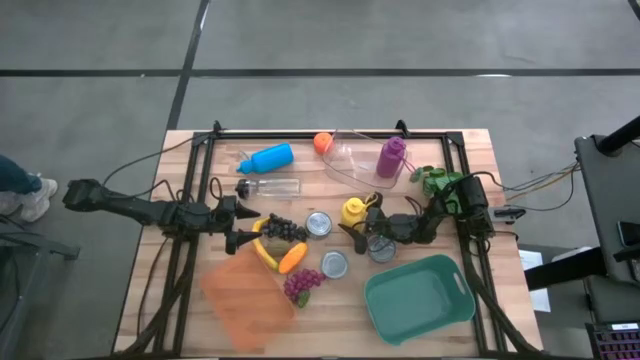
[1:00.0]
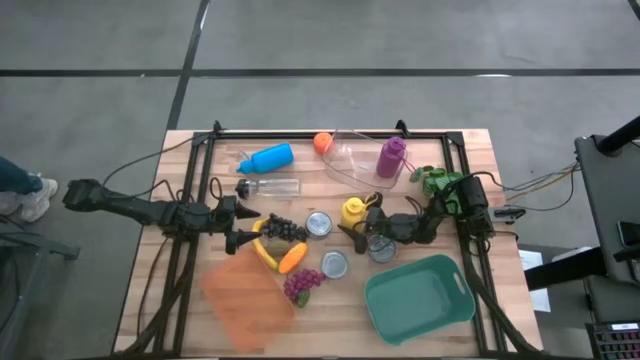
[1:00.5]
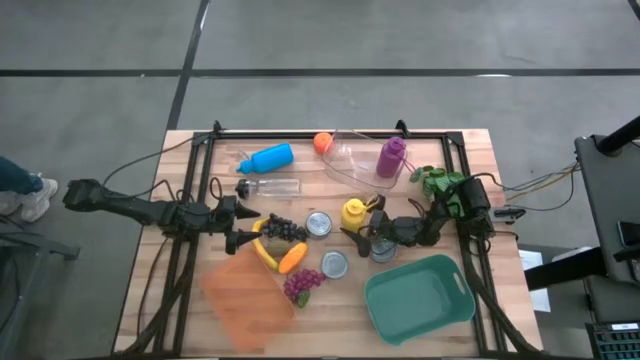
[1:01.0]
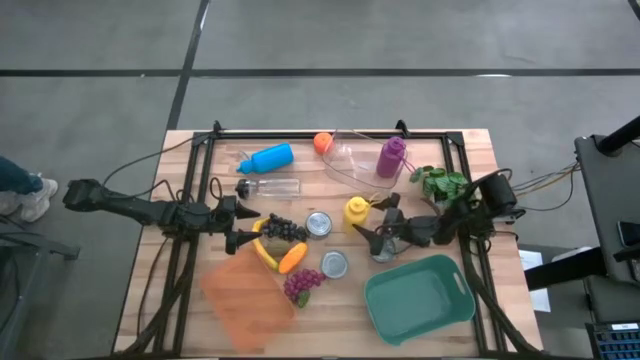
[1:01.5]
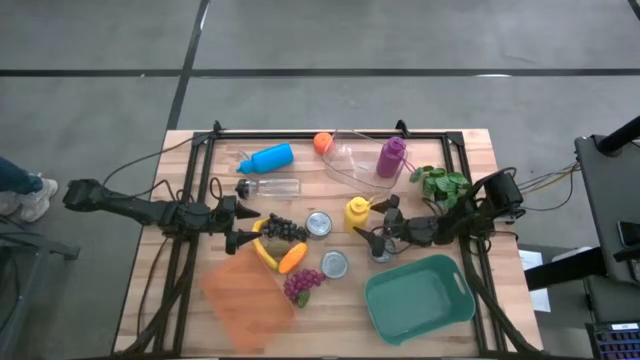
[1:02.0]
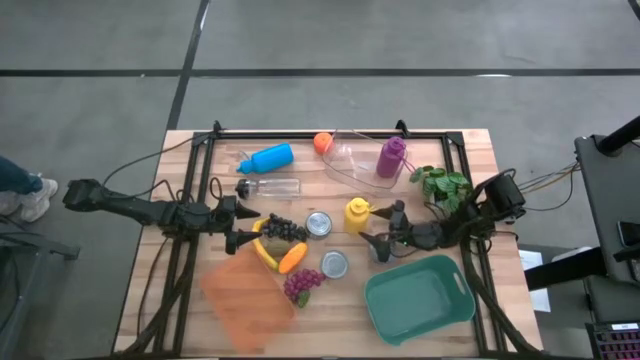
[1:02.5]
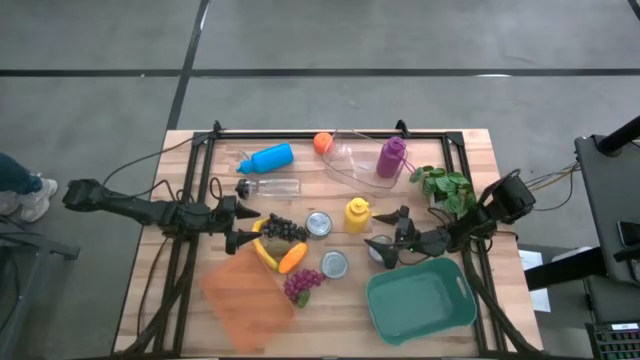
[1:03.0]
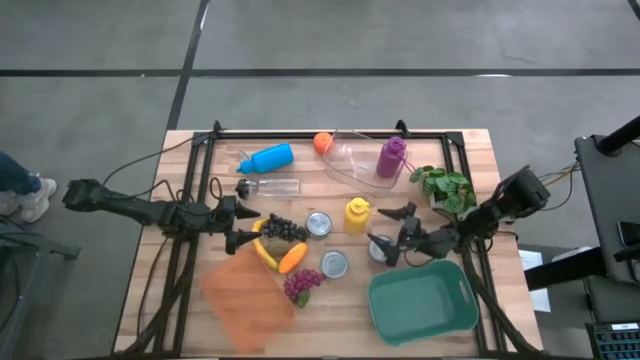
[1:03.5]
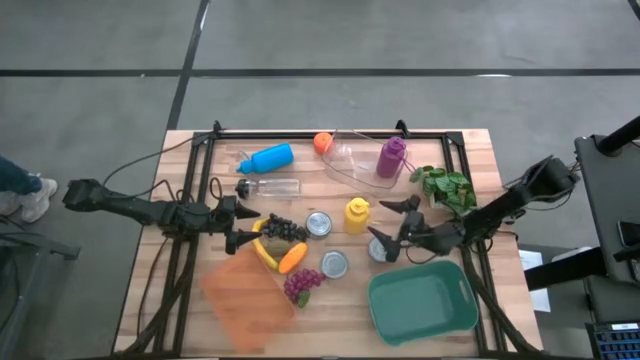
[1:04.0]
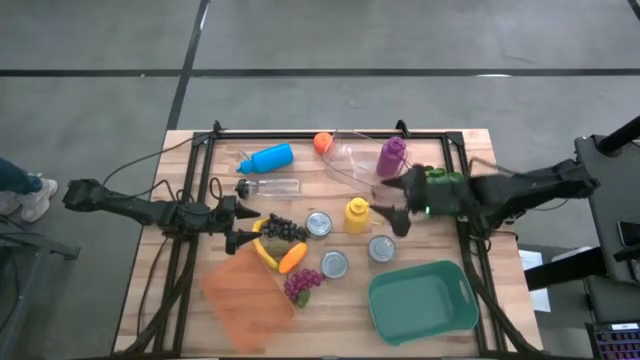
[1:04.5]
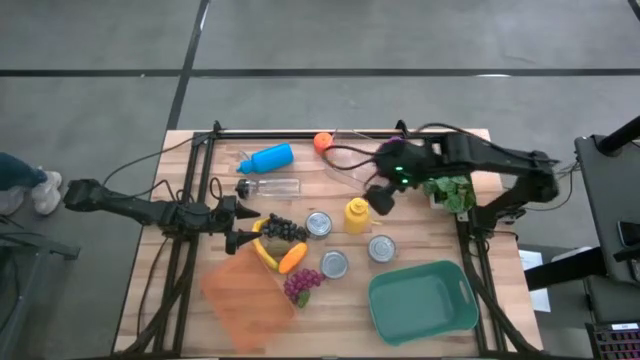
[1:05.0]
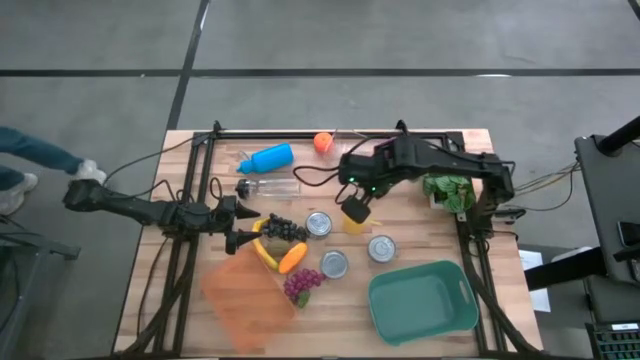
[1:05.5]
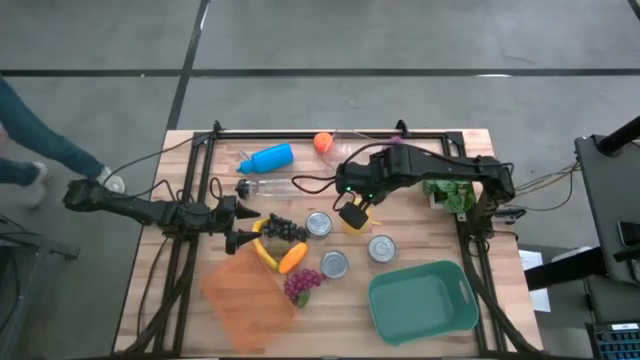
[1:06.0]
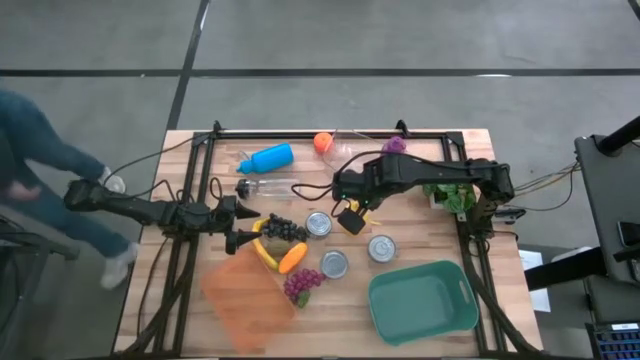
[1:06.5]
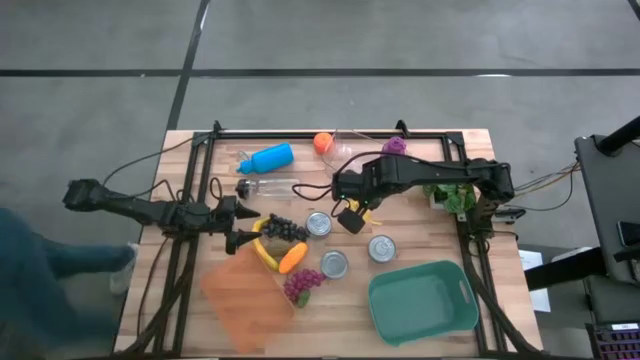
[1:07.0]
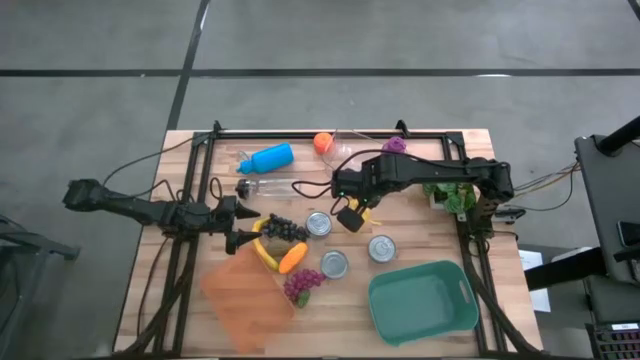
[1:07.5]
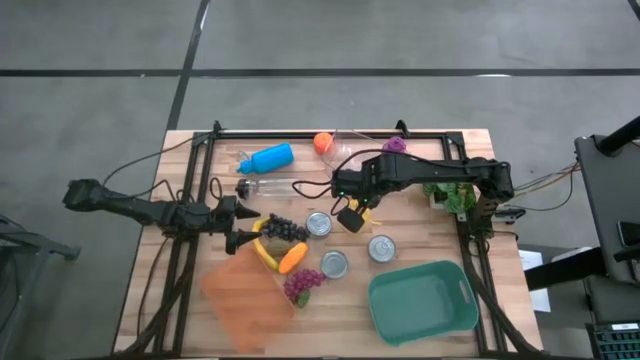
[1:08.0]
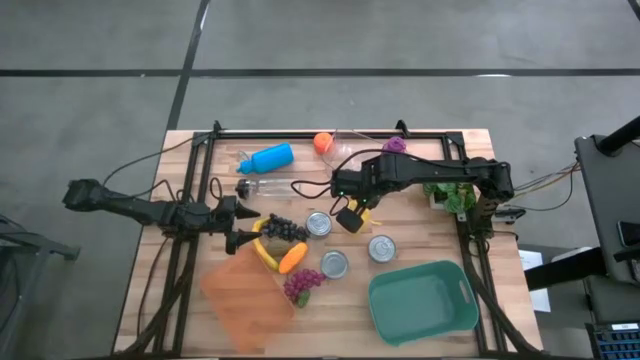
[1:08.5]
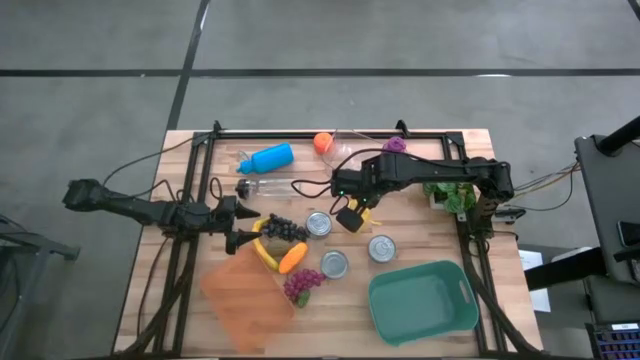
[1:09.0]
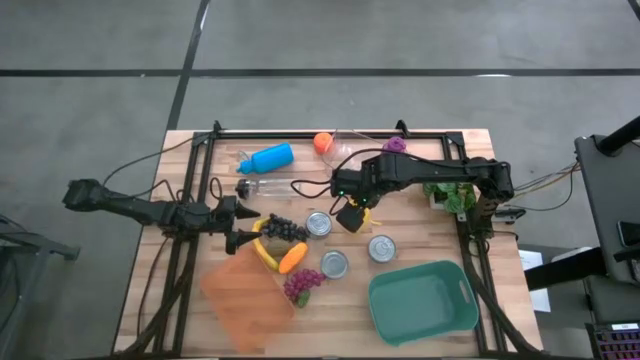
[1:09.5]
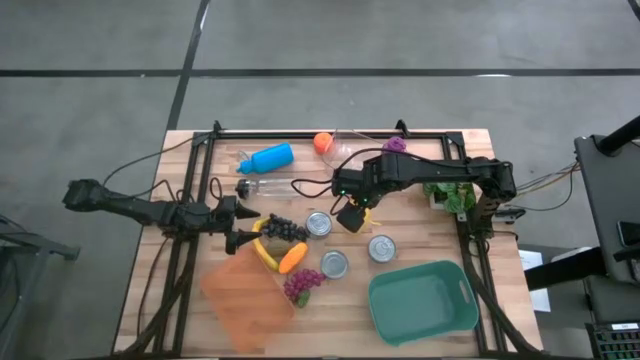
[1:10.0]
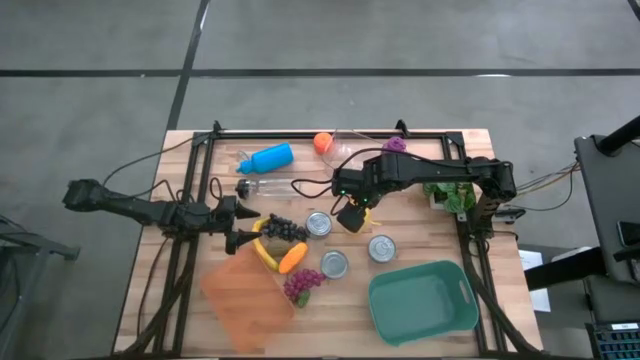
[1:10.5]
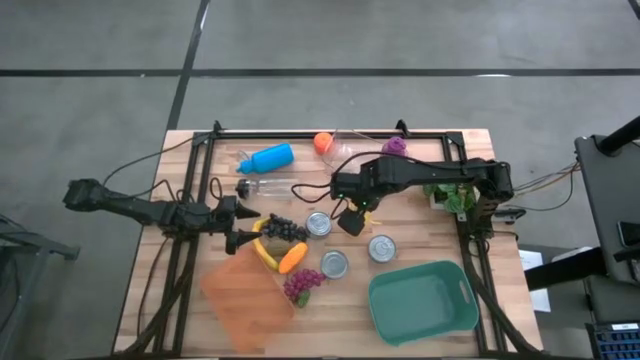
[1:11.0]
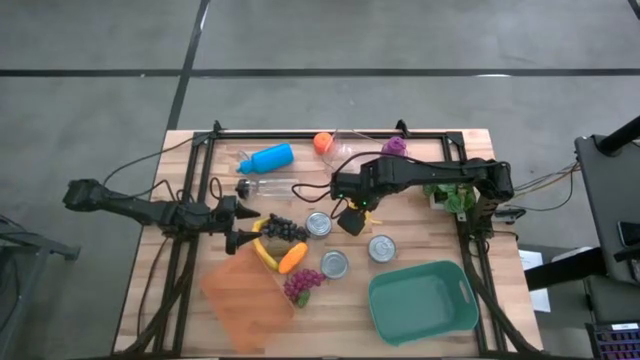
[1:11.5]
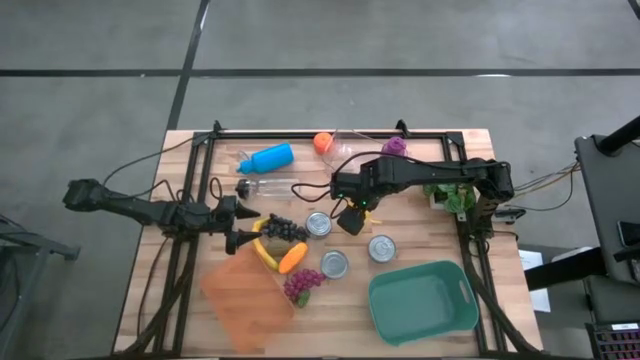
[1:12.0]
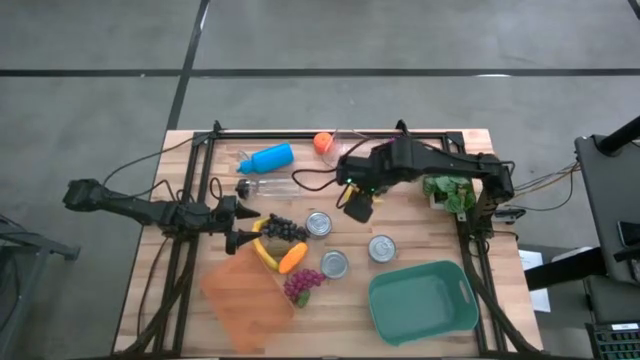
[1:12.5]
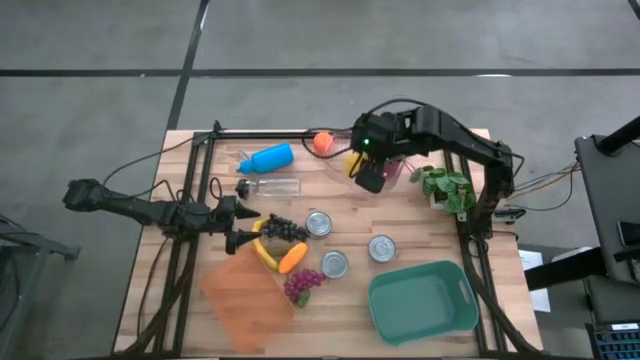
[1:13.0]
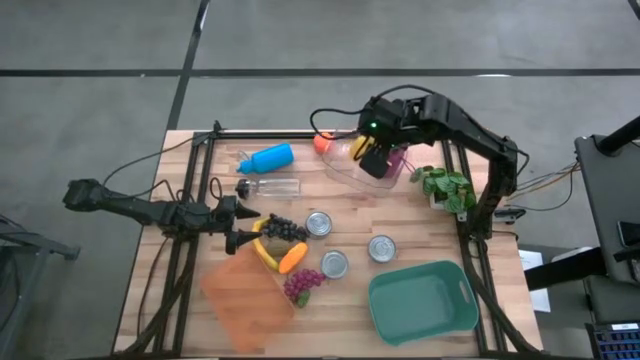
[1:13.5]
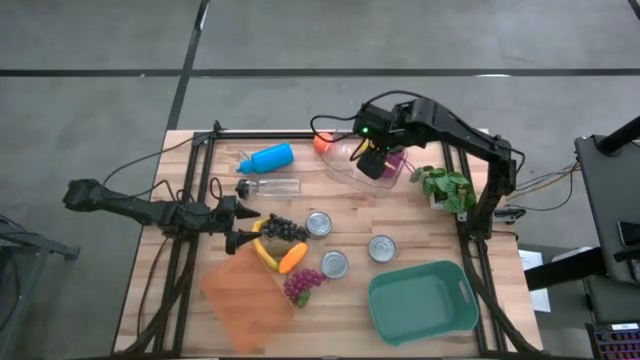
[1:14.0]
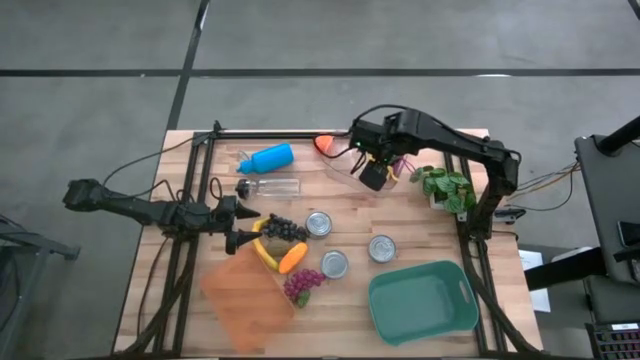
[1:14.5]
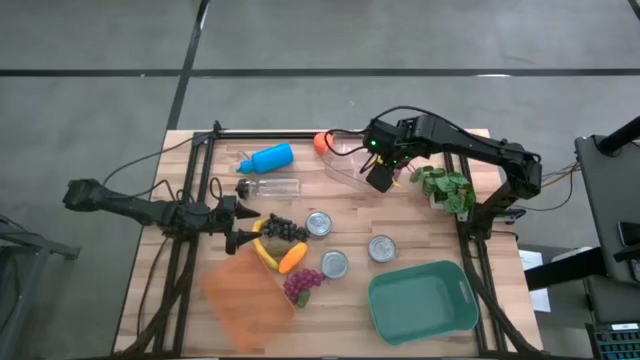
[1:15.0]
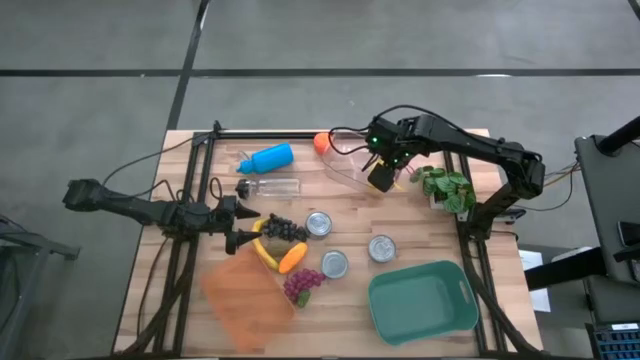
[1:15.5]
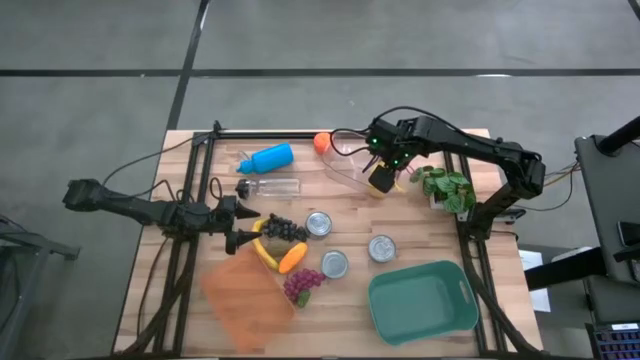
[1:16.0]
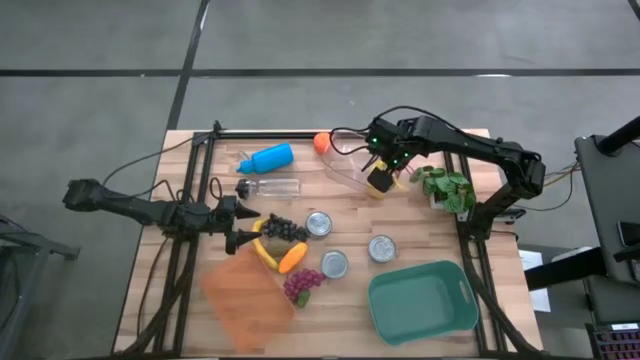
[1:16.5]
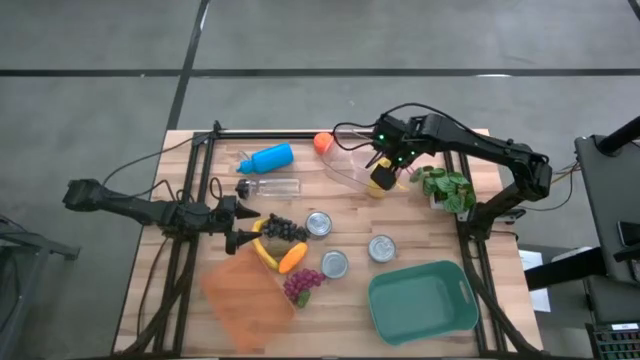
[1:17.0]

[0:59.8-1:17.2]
Task: Pick & Place Food Item
Put the yellow water bottle into the transparent bin

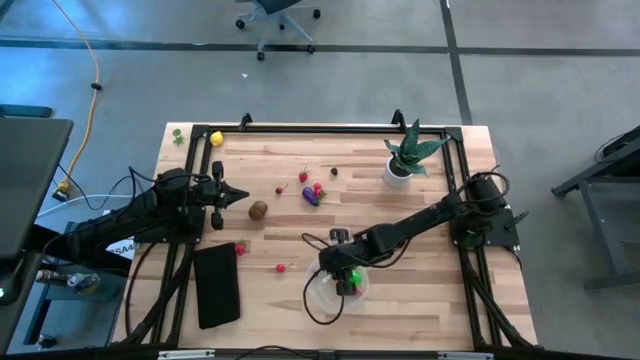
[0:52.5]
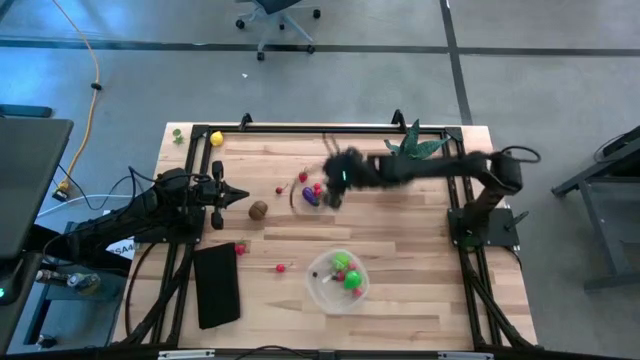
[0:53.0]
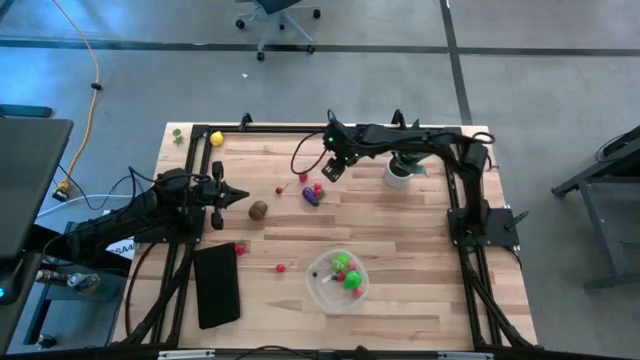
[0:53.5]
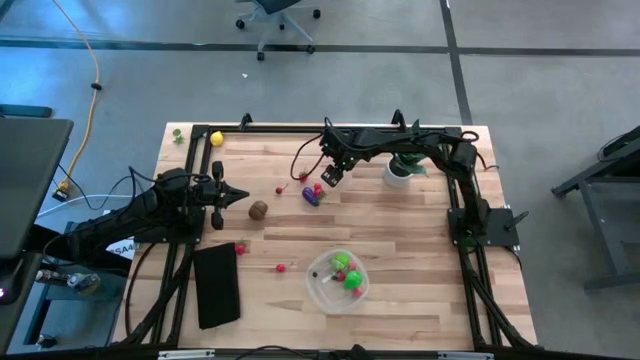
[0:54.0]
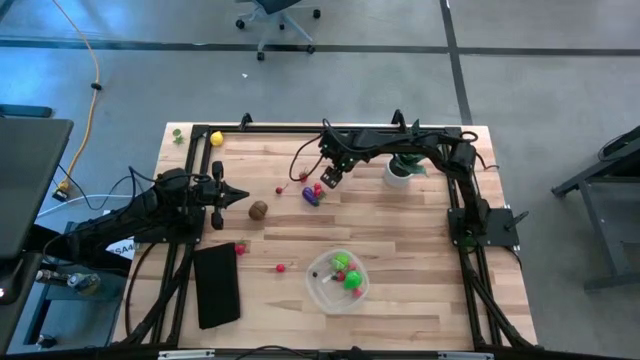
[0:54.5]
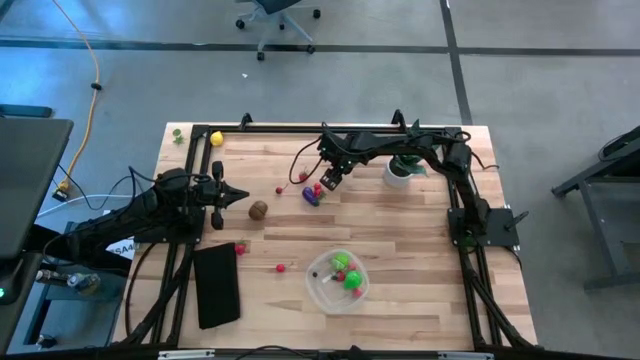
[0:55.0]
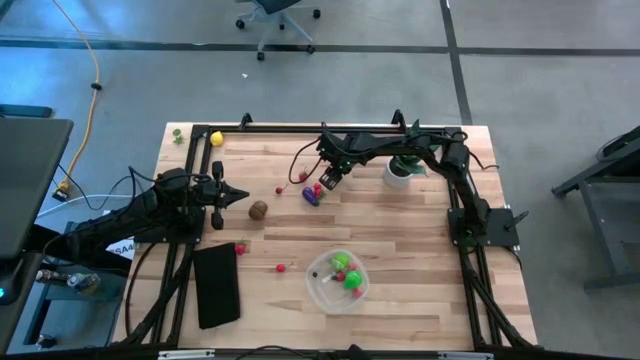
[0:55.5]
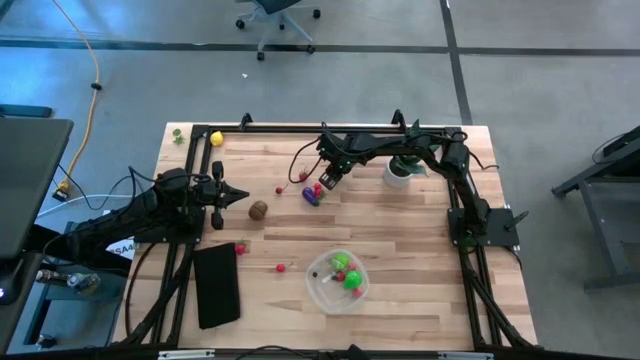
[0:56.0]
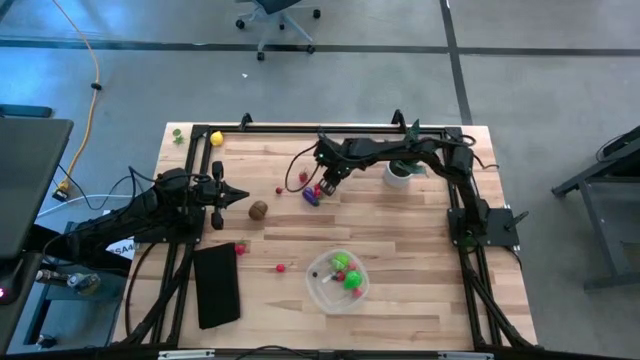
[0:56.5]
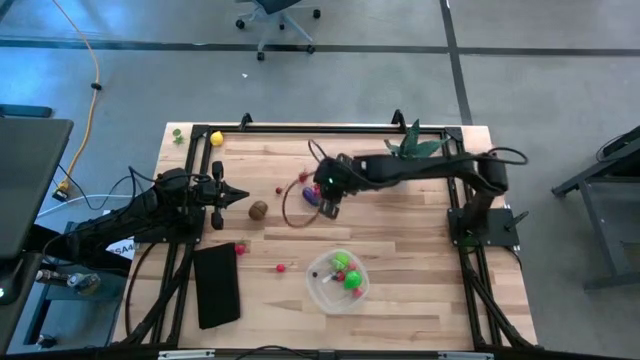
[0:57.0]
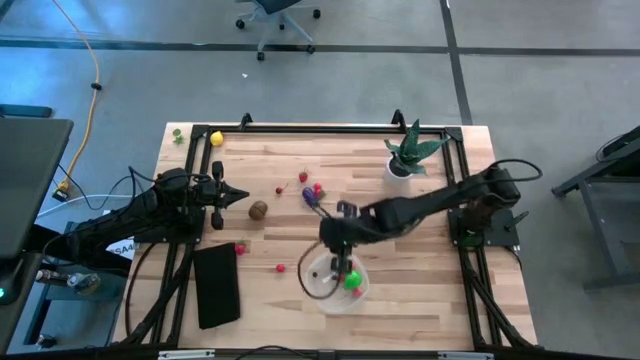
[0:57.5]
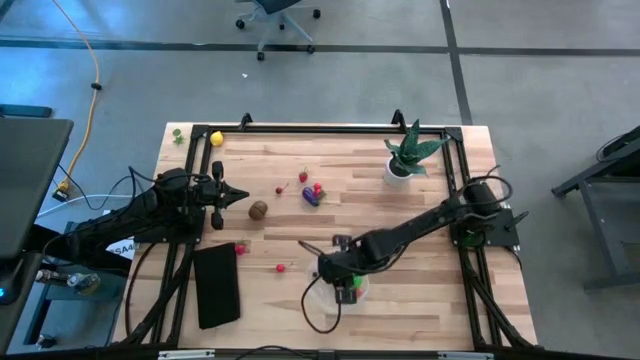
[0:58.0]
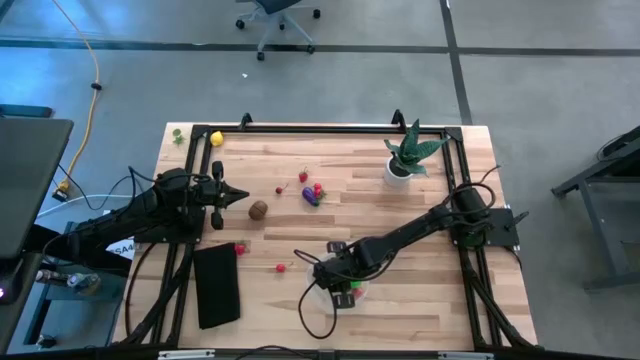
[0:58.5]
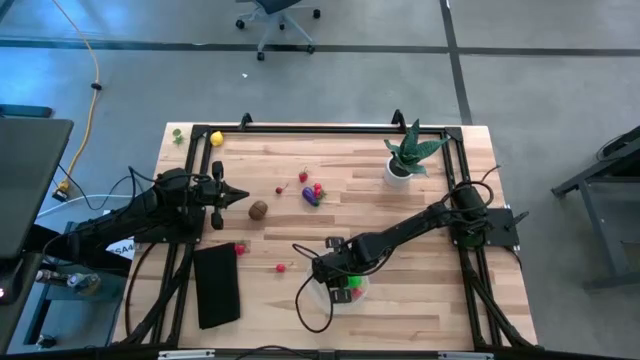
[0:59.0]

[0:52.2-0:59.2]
Task: Pick and placing Produce into tupperware
Put the blackberry into the transparent container
